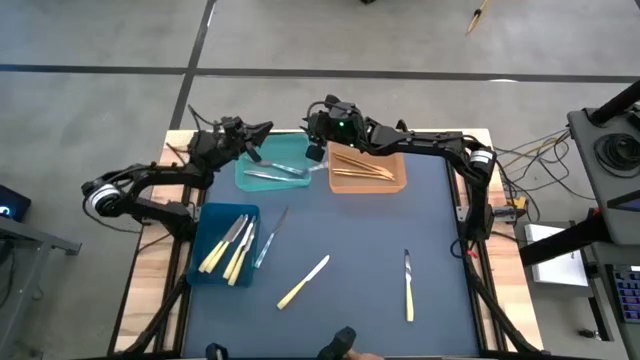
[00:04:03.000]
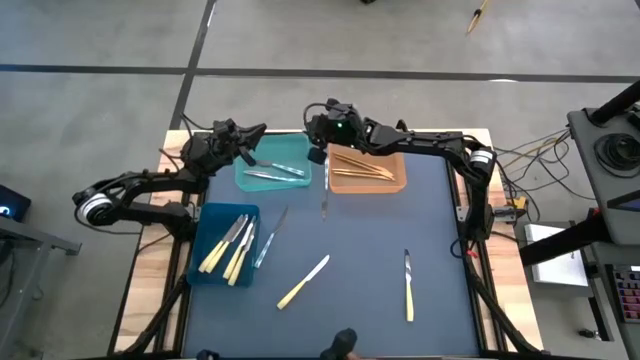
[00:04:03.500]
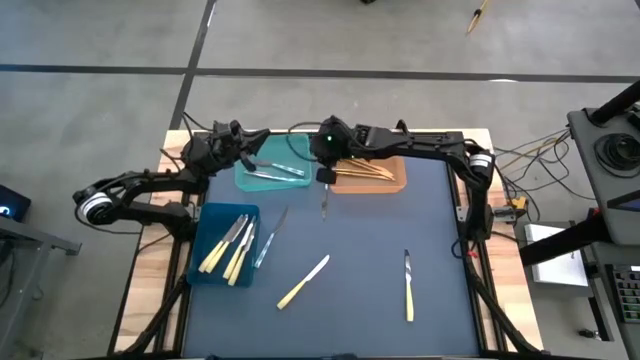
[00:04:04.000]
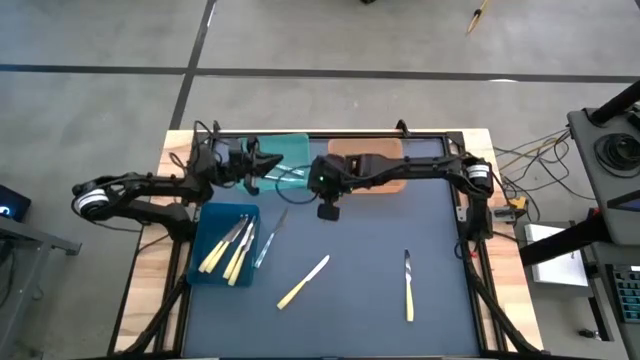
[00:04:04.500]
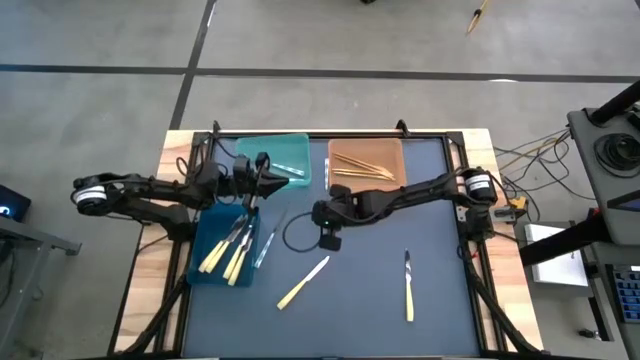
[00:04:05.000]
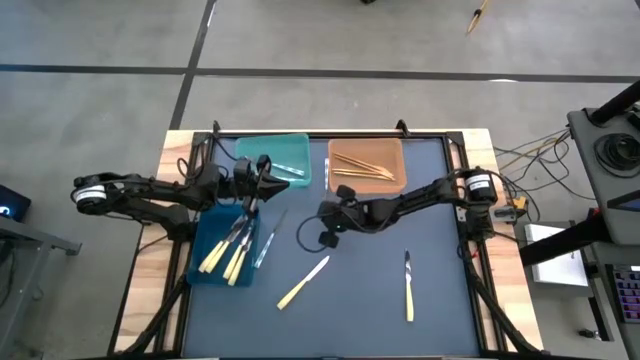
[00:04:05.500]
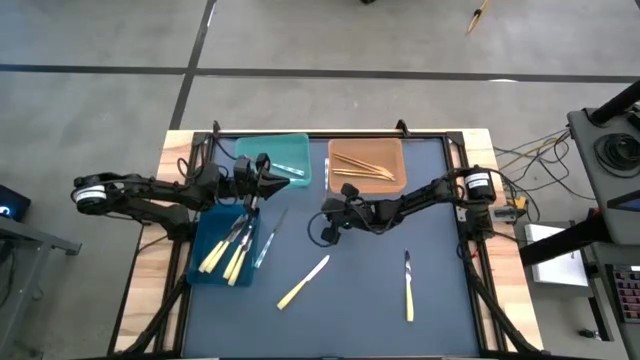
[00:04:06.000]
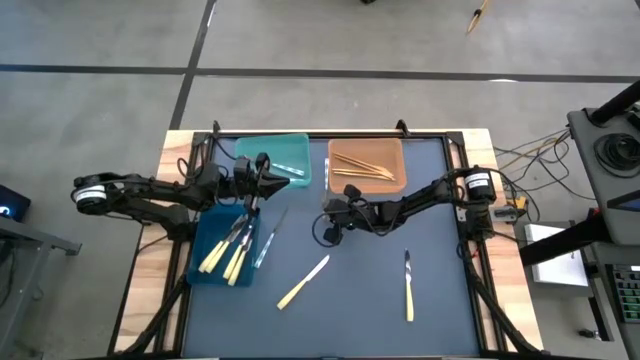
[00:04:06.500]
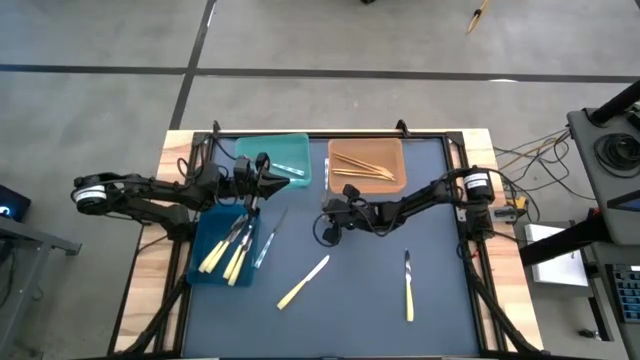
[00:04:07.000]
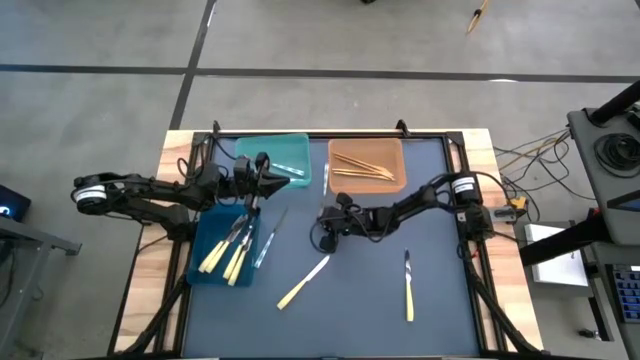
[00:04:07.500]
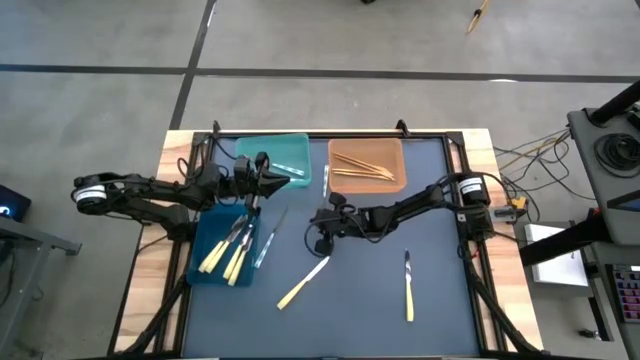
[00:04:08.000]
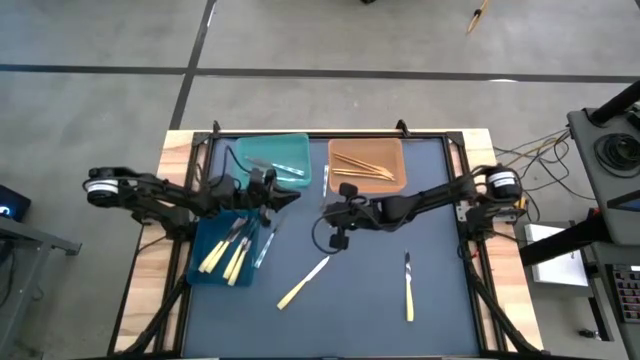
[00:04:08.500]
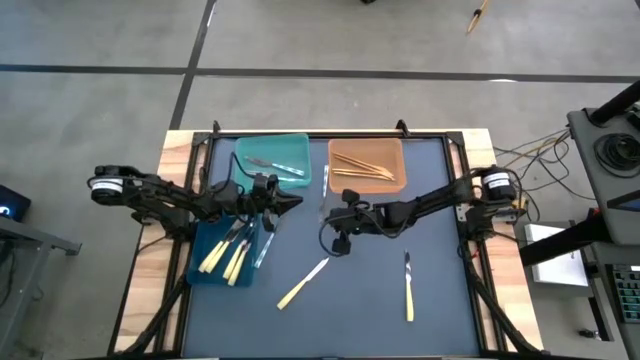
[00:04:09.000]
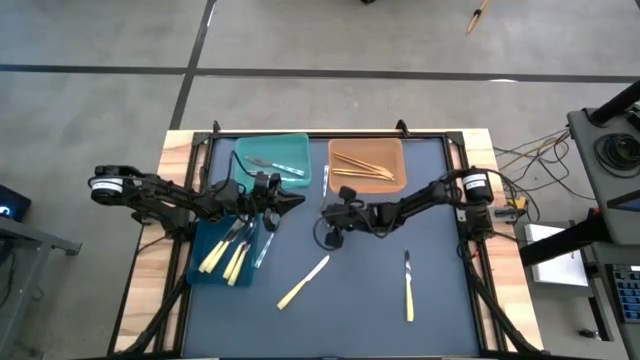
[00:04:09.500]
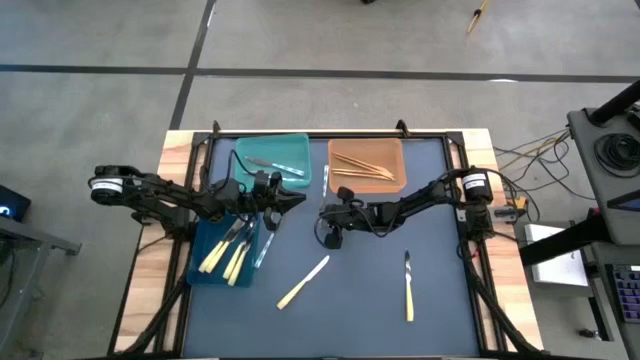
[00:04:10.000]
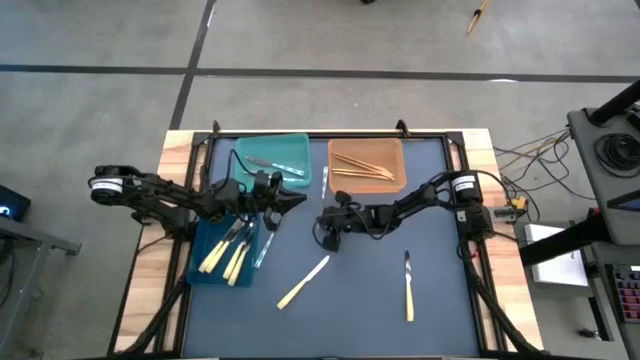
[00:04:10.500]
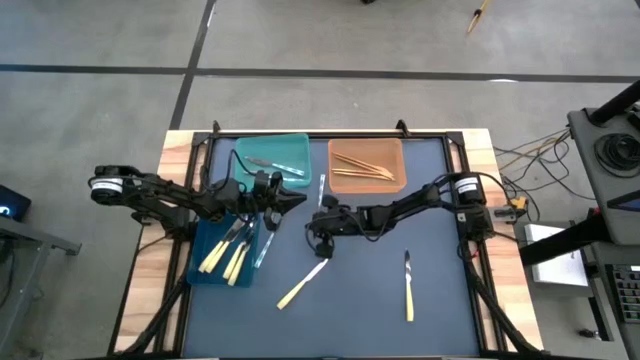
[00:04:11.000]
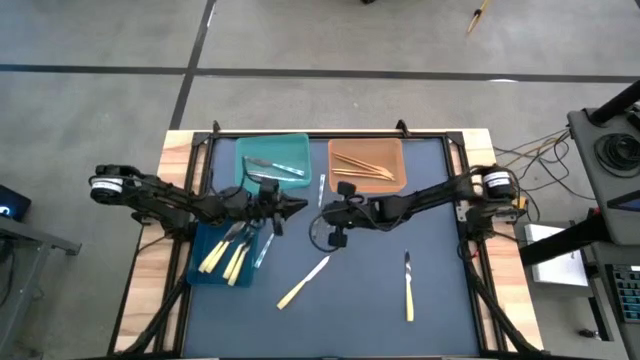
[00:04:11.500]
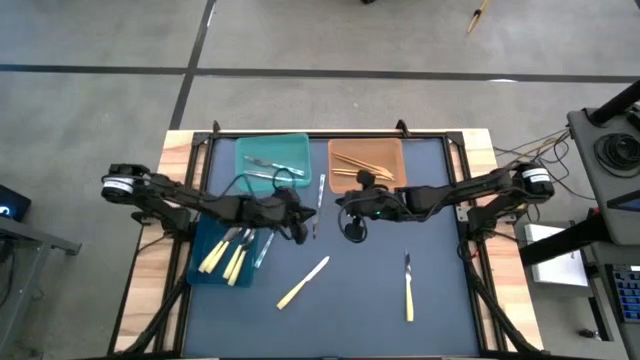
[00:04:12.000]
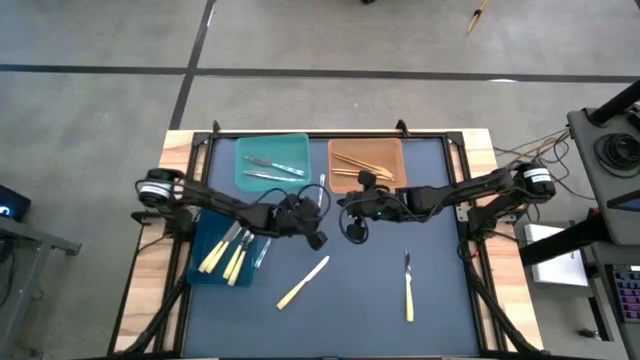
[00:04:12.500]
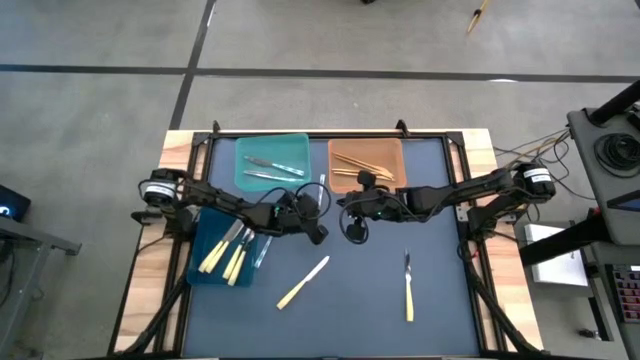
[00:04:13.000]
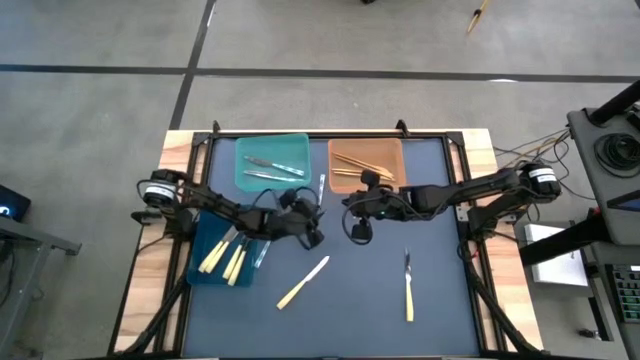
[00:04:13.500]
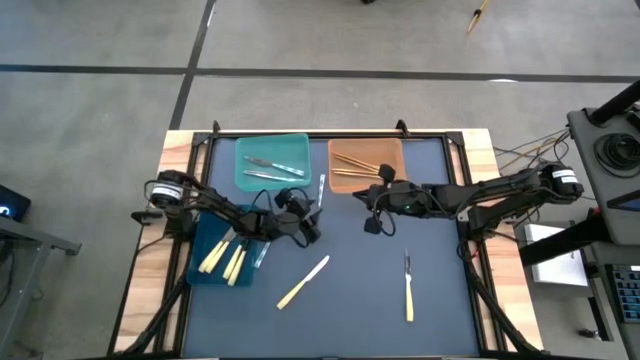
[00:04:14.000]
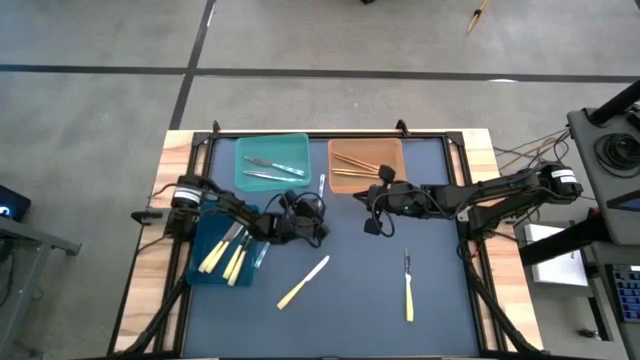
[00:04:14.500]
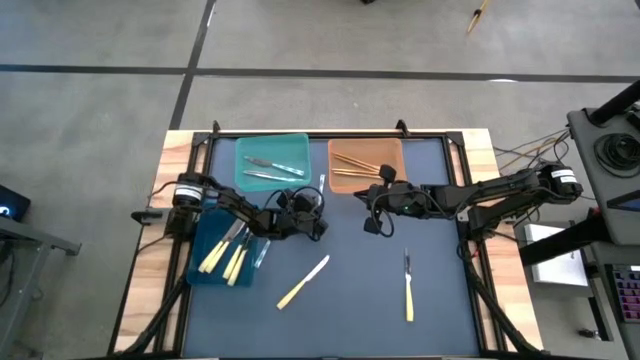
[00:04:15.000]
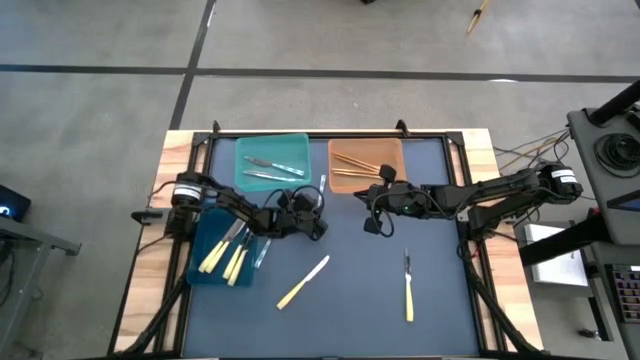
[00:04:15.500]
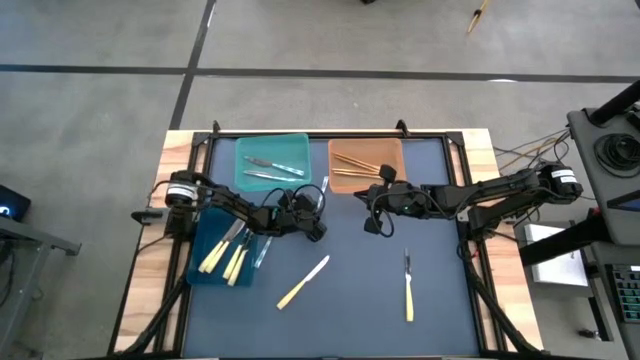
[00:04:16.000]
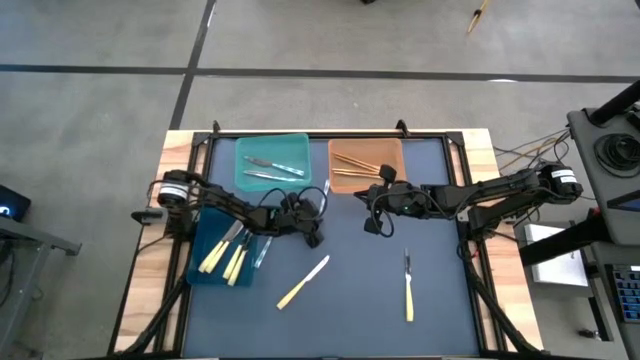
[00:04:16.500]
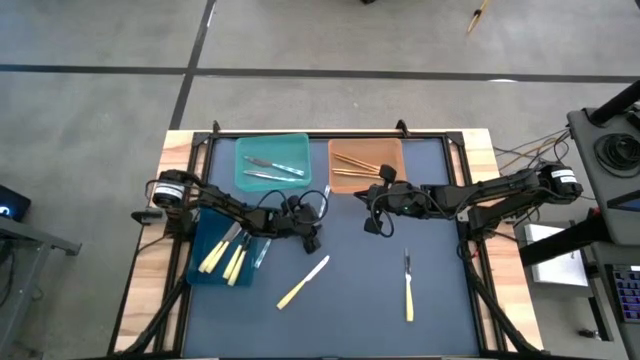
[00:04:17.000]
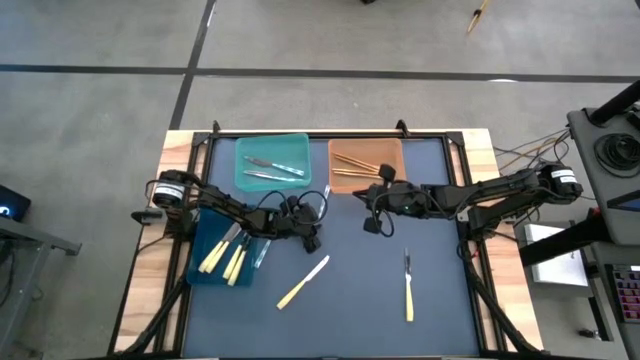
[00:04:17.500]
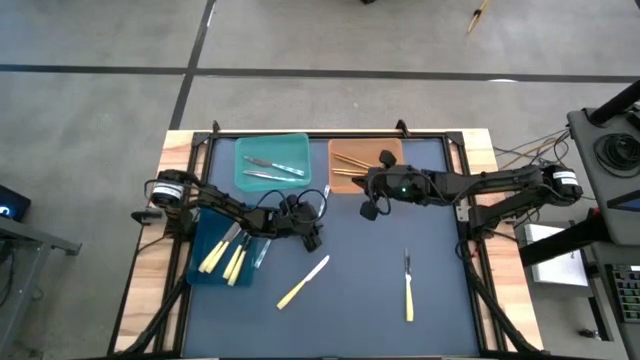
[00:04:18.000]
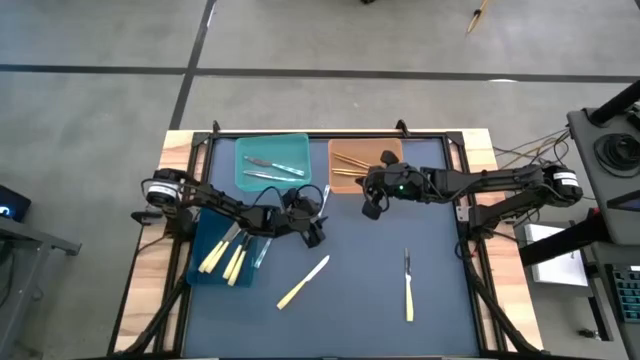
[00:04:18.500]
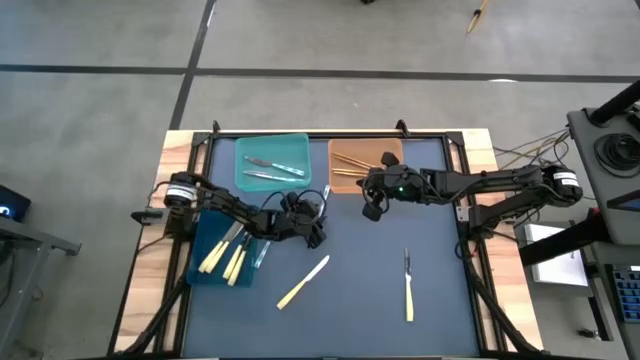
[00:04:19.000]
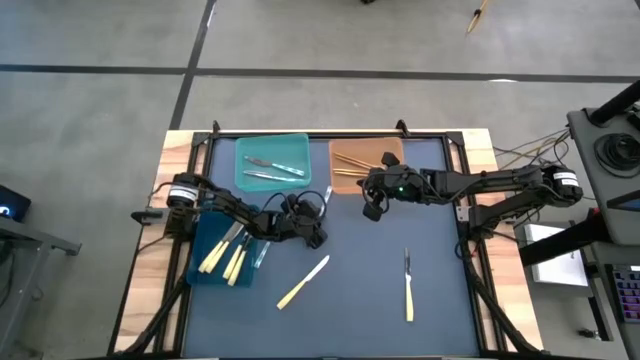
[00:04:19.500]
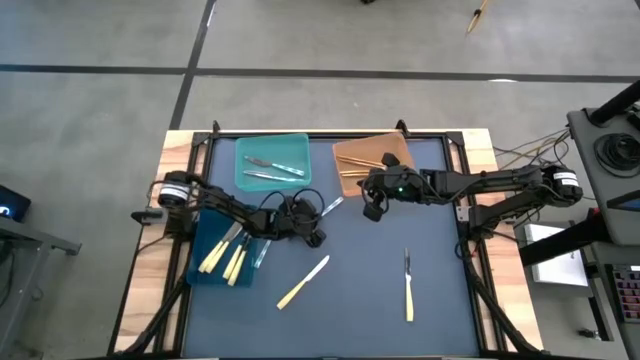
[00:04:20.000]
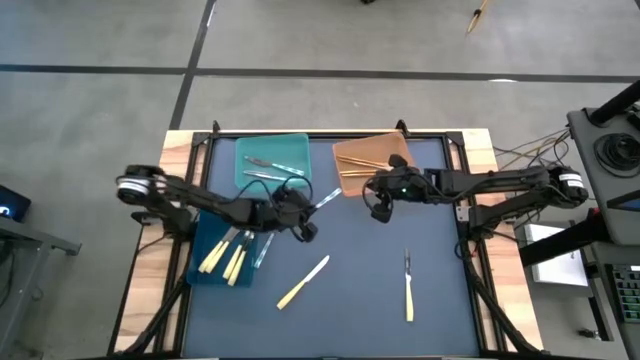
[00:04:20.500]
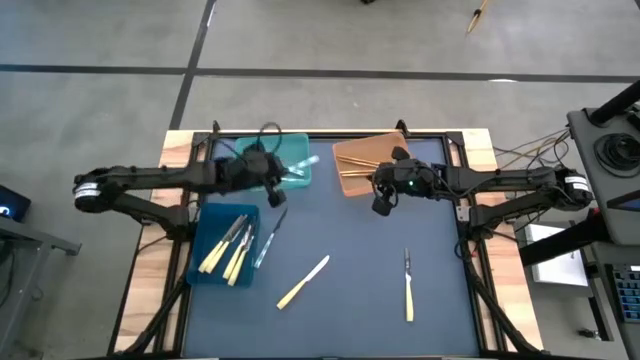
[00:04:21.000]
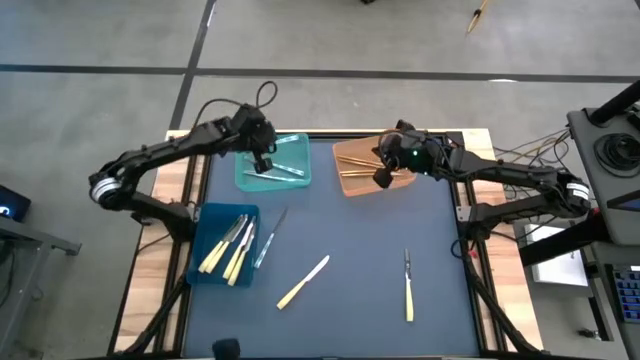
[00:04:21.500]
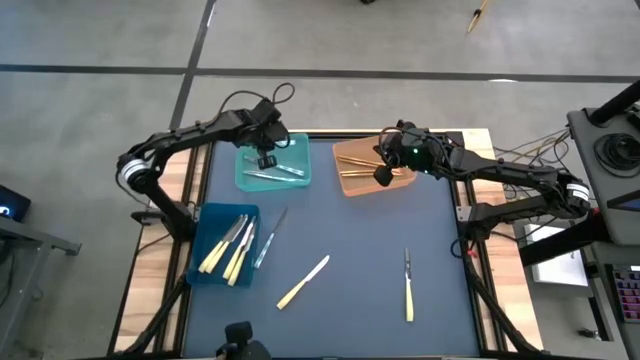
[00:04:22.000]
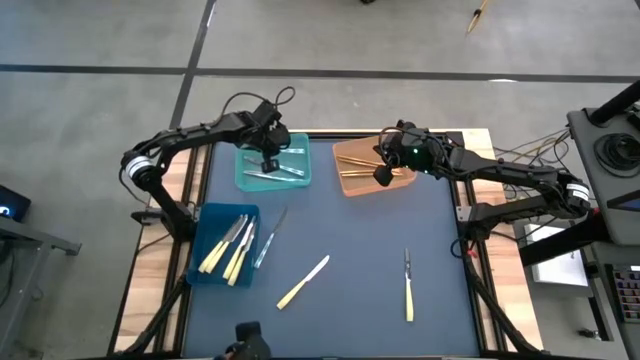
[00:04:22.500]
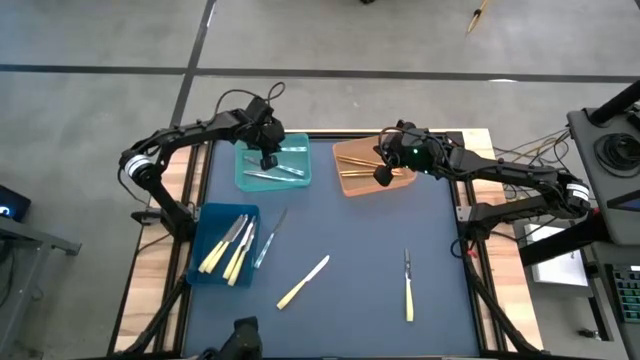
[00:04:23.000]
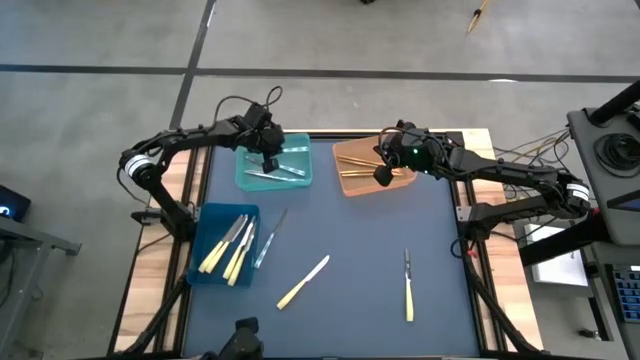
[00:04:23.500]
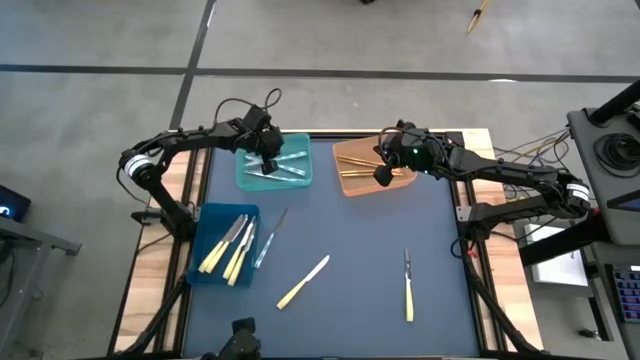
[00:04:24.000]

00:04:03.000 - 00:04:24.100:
Task: Sort silverware by color (type)
Put the white knife into the light blue bin
